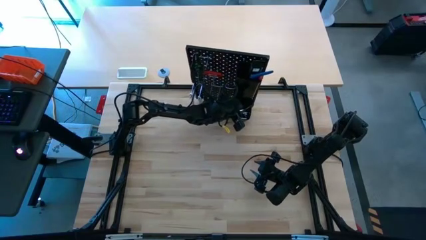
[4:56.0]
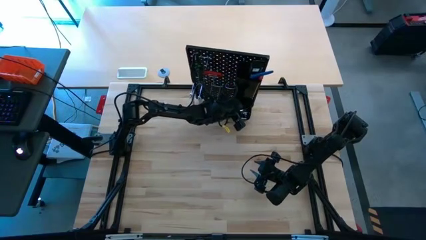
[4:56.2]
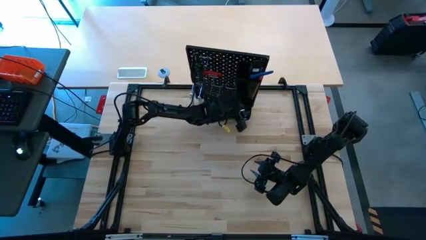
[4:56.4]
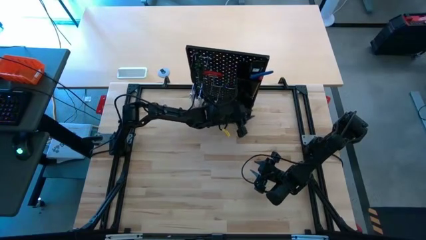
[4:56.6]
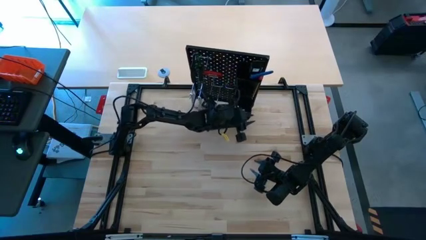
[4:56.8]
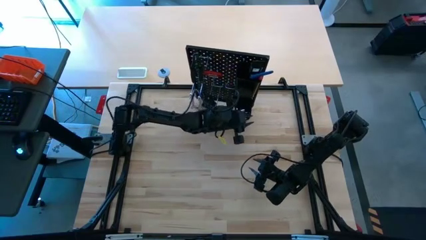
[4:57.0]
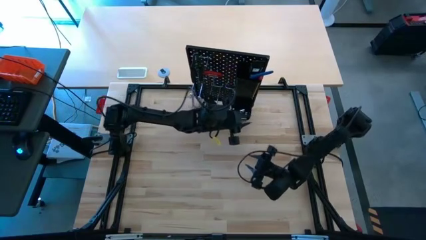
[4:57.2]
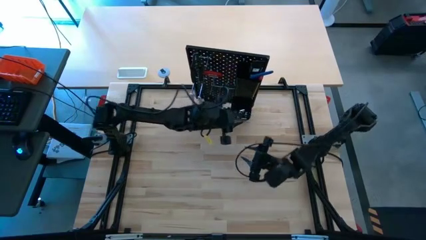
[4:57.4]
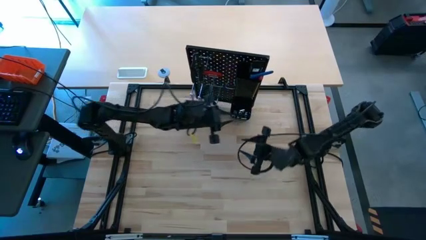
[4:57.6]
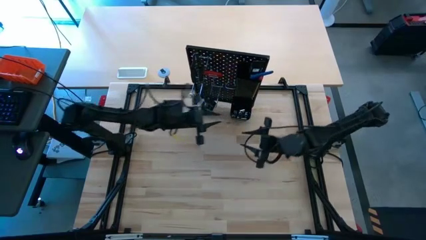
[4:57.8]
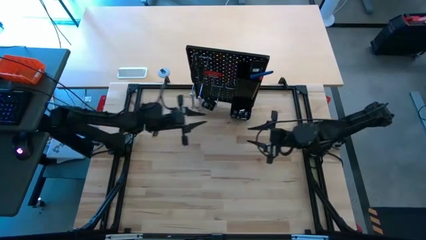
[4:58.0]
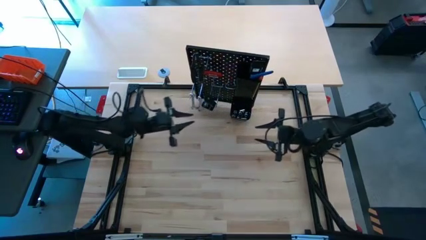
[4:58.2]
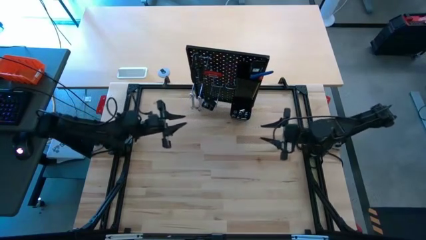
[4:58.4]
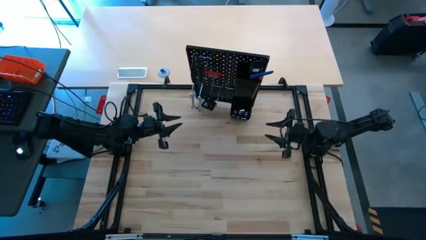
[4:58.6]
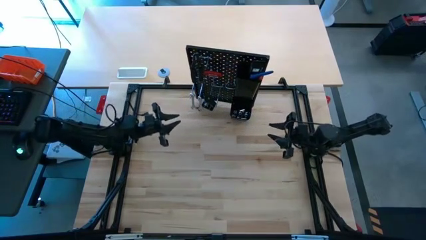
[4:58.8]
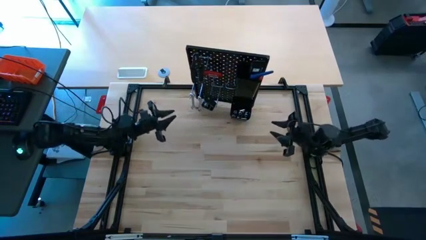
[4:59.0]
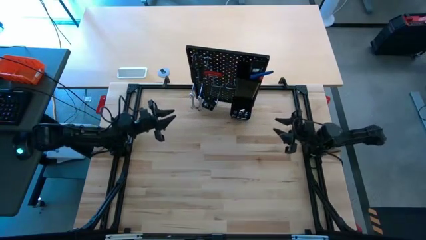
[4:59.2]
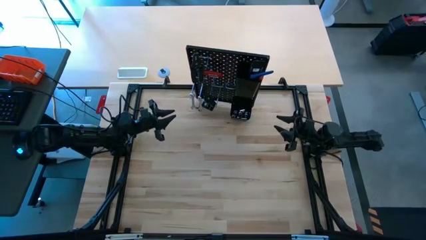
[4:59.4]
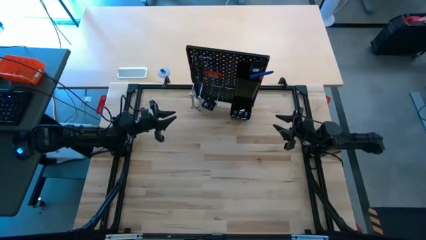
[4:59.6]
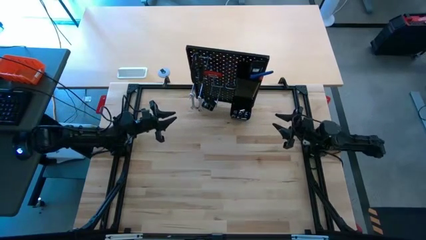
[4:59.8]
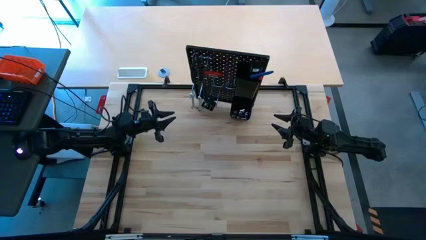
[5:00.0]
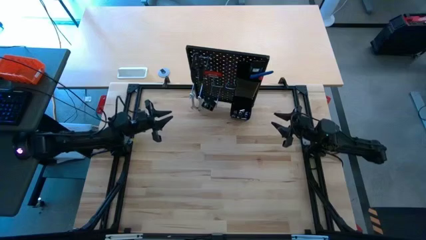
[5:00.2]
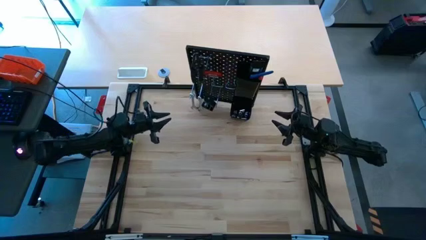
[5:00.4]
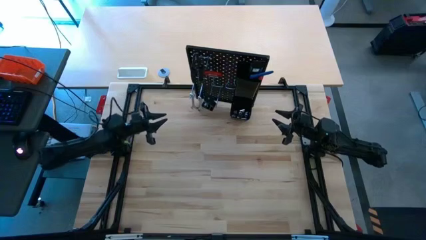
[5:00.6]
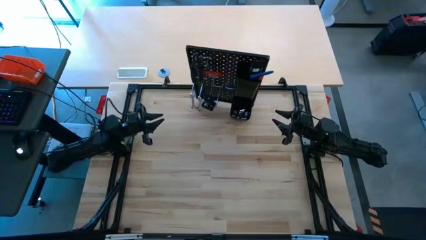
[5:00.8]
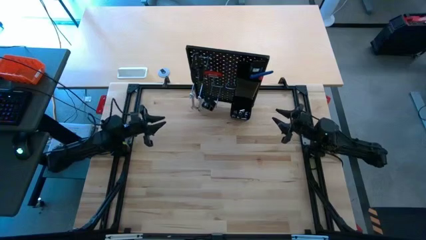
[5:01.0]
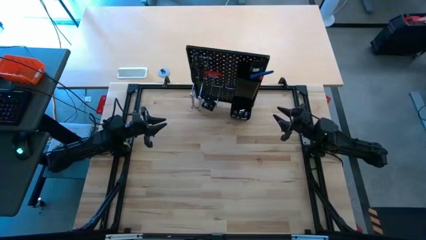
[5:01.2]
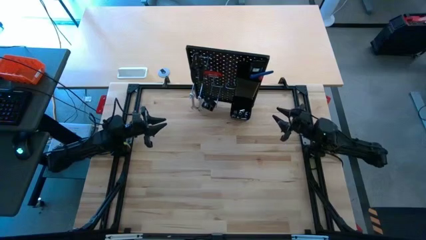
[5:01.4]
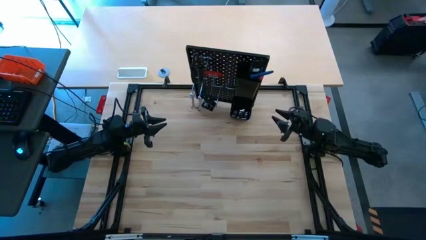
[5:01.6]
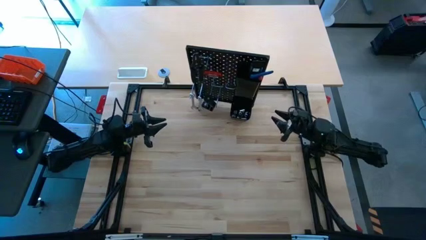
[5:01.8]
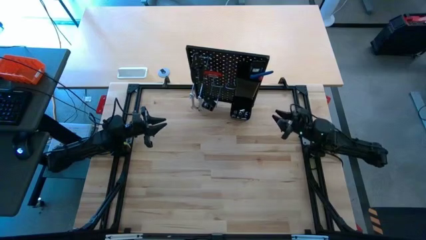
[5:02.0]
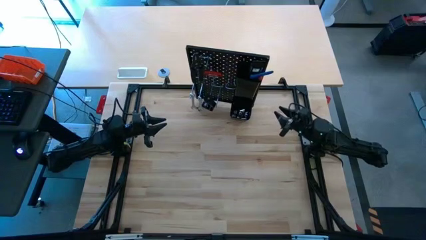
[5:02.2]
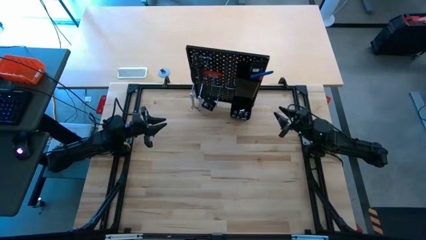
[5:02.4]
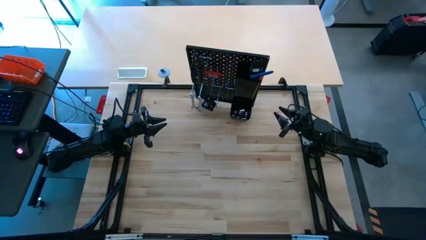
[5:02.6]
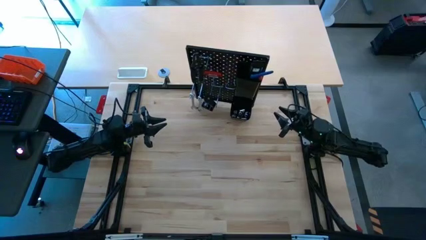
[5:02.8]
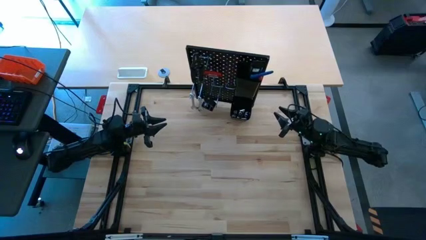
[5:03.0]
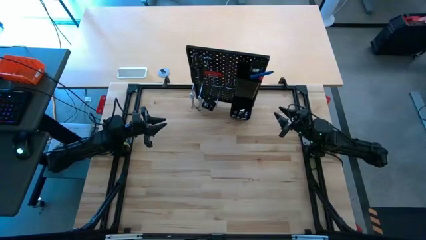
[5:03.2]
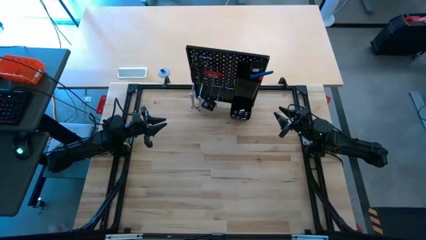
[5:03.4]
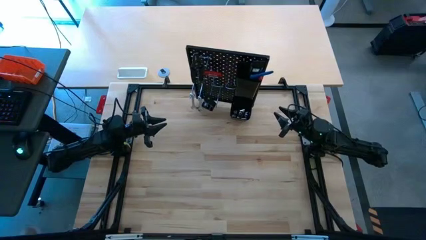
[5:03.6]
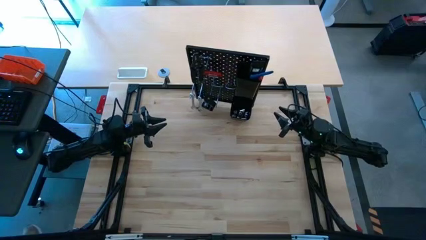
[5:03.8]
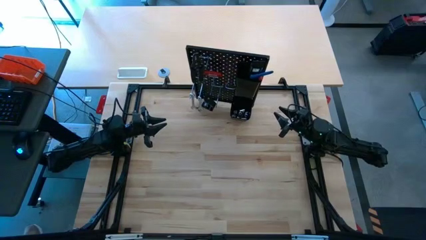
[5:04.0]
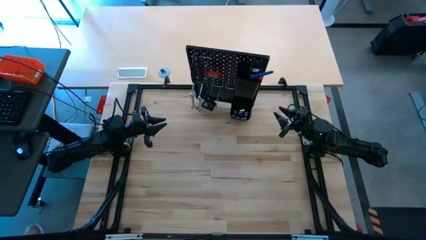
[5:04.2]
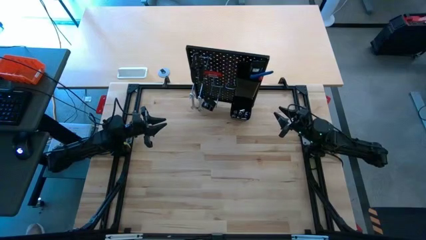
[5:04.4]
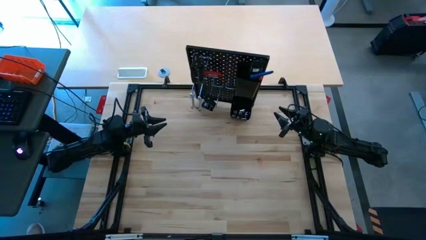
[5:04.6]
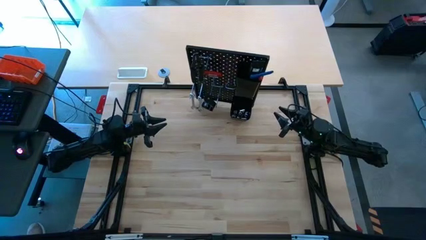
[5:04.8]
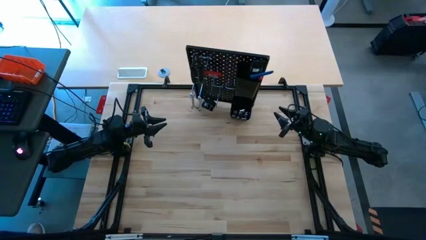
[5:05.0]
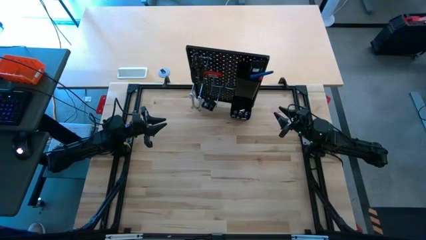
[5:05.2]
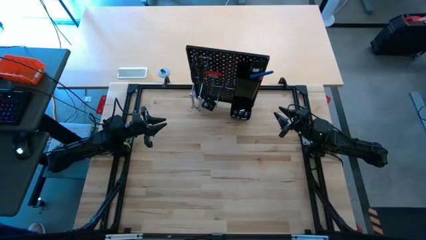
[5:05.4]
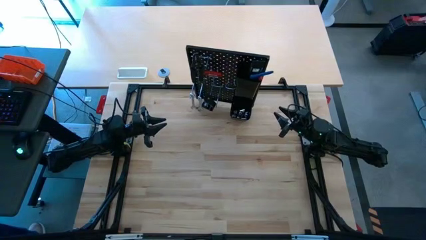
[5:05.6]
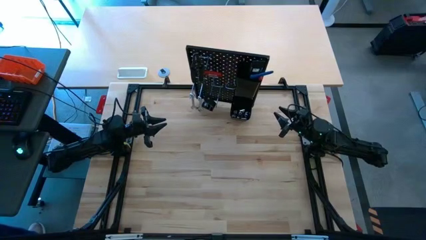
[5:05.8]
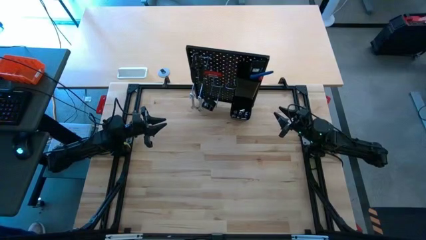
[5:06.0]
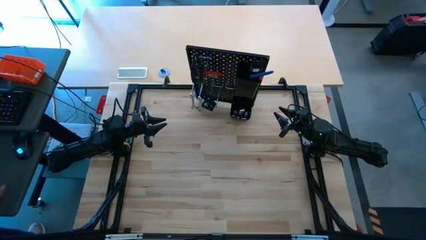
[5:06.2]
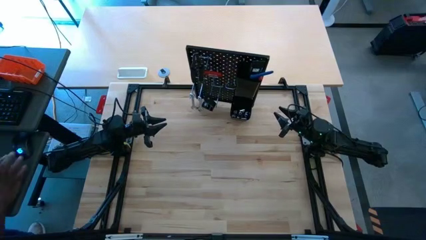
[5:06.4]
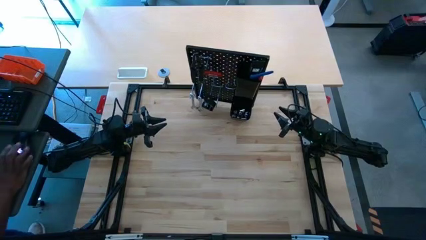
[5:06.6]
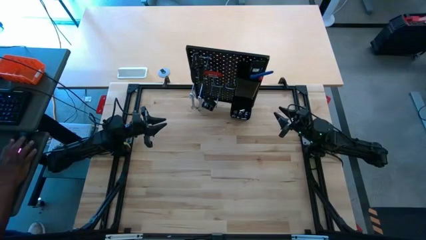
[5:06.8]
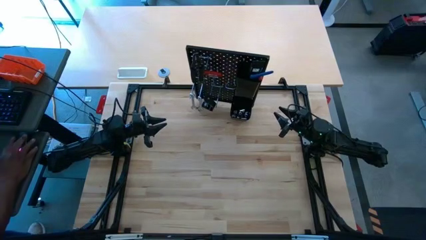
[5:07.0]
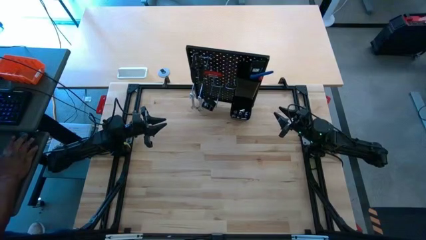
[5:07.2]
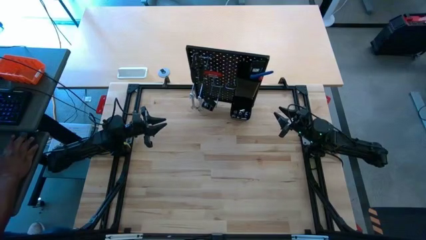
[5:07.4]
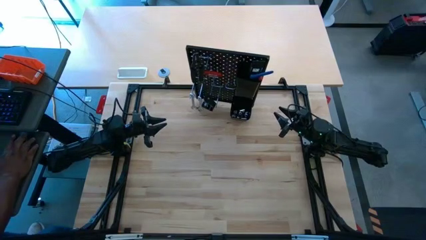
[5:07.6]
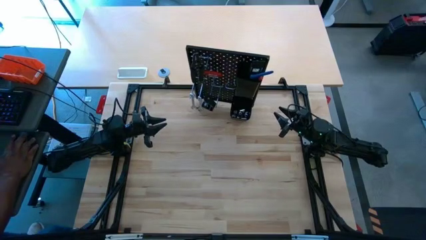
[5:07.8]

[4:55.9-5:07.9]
Task: Hang tools onto peg board
Return to home position

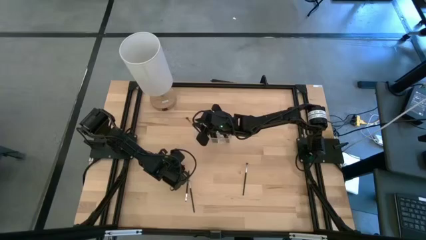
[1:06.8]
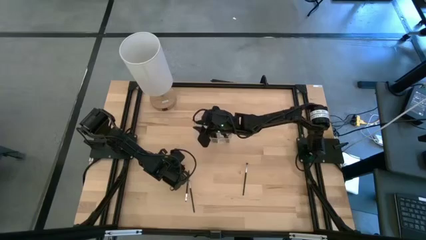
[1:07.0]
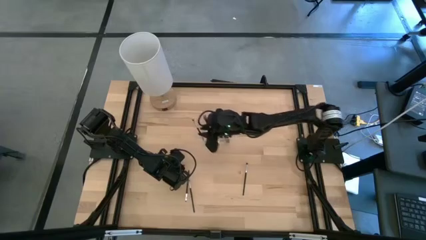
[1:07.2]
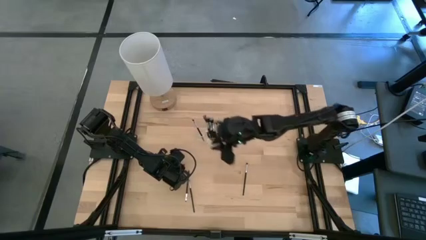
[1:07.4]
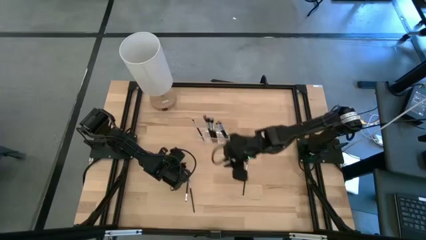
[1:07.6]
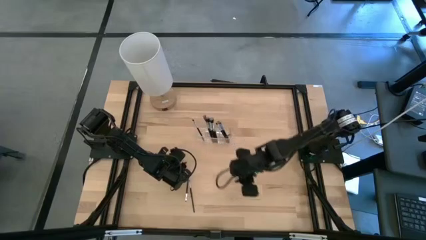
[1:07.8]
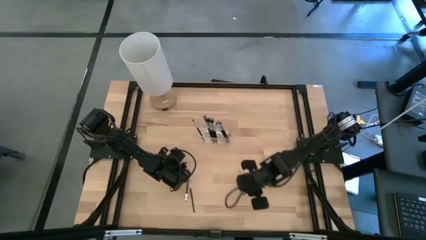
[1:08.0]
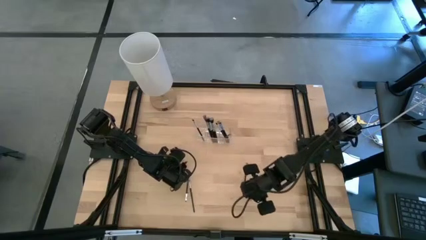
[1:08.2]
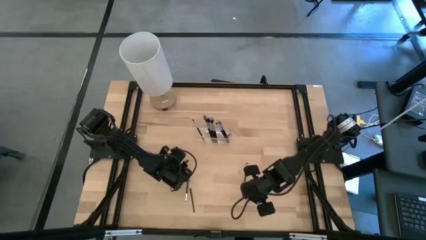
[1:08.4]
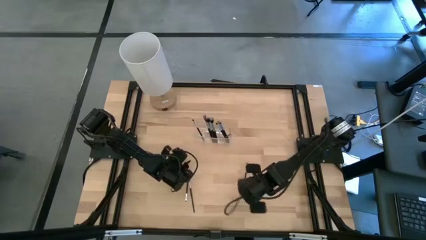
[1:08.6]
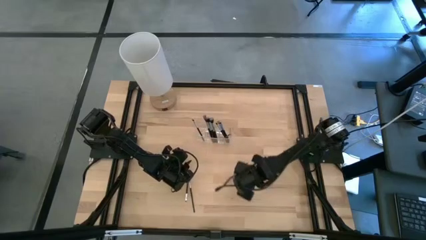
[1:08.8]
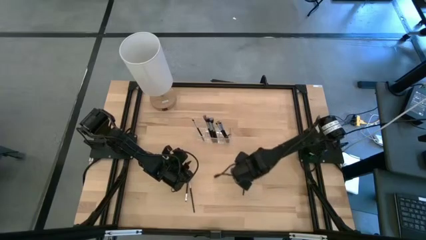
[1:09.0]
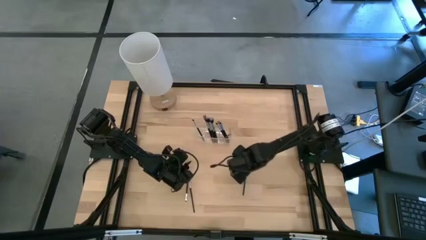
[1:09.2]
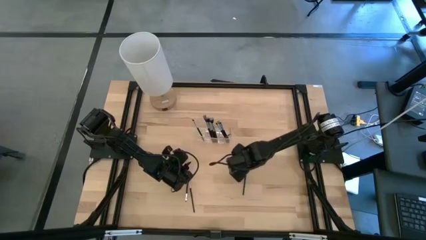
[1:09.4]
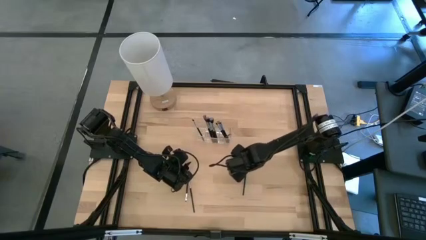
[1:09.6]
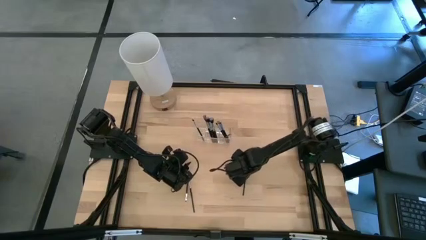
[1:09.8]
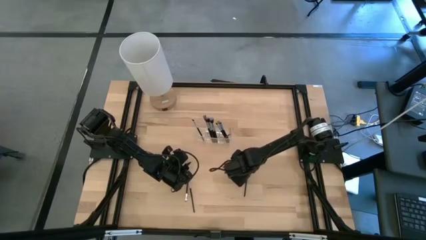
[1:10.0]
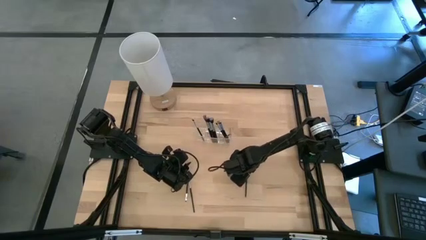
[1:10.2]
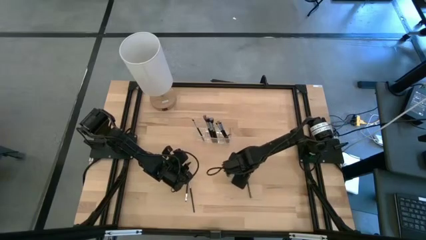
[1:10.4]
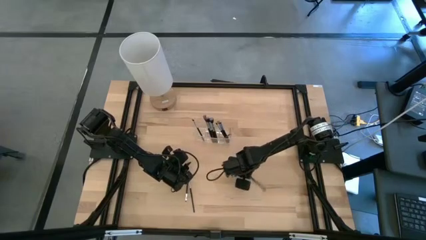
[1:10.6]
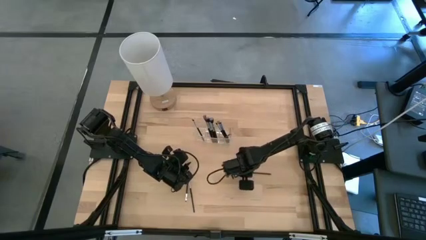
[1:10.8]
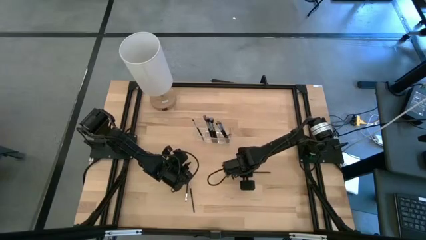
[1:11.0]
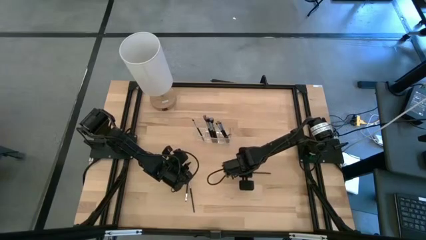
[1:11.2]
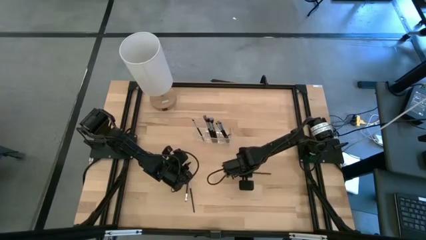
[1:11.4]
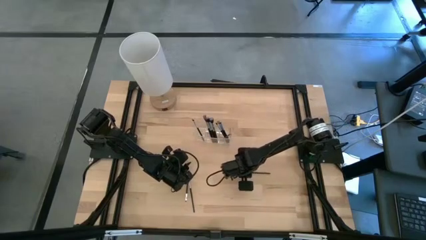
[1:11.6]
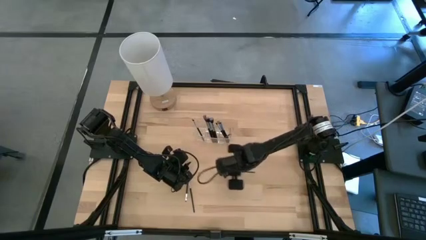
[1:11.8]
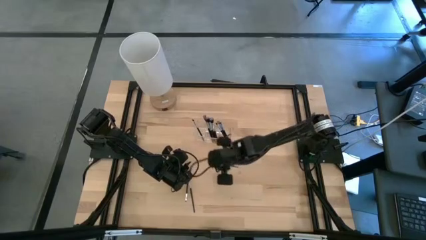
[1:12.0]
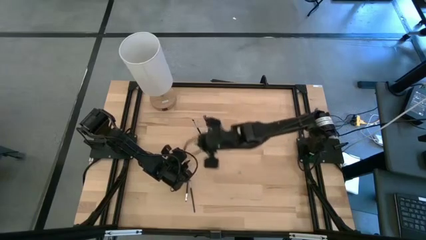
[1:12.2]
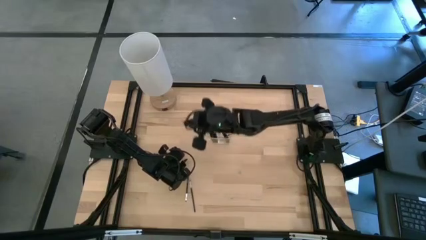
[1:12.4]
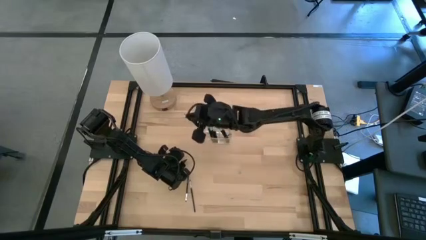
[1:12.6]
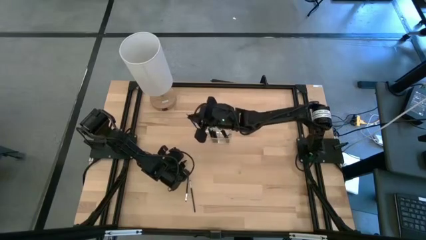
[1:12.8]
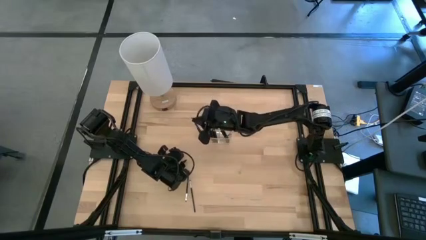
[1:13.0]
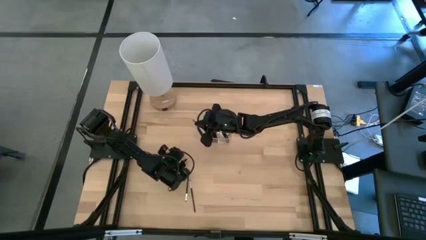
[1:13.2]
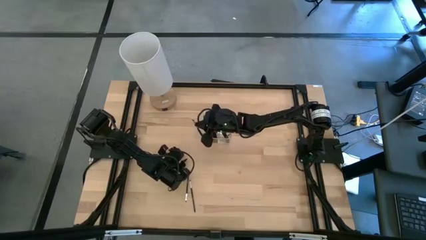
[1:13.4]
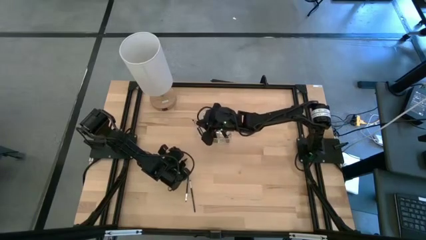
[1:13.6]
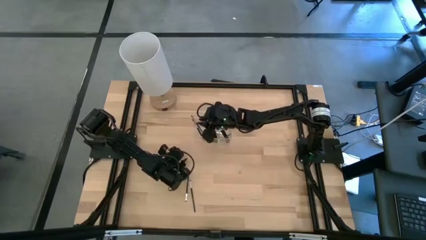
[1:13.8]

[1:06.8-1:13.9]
Task: Put items in baskets/containers
Put the black foundation brush into the transparent organizer
